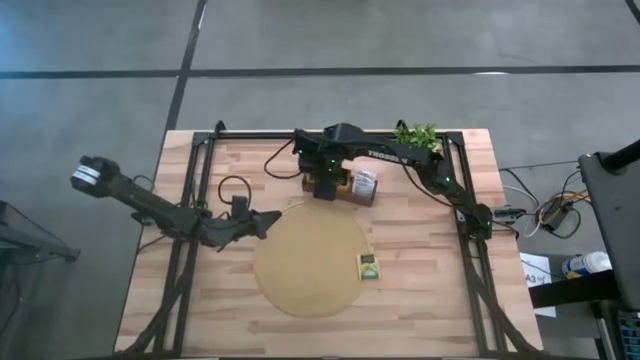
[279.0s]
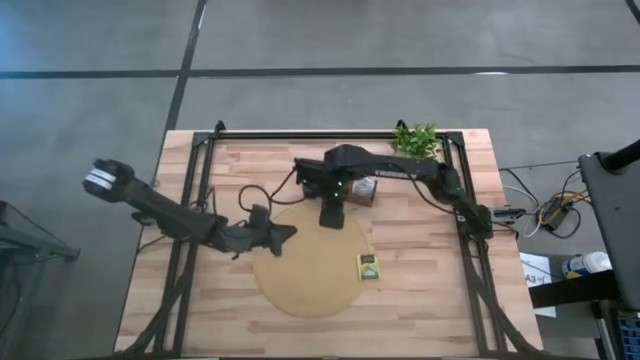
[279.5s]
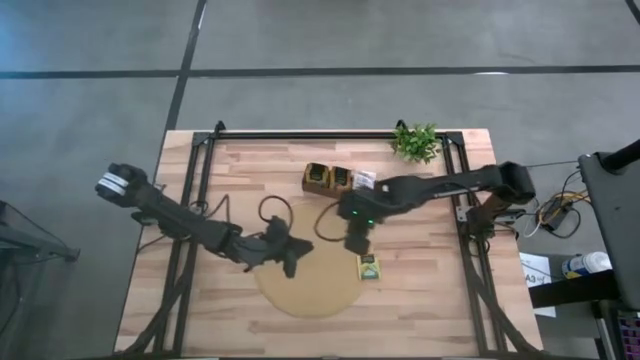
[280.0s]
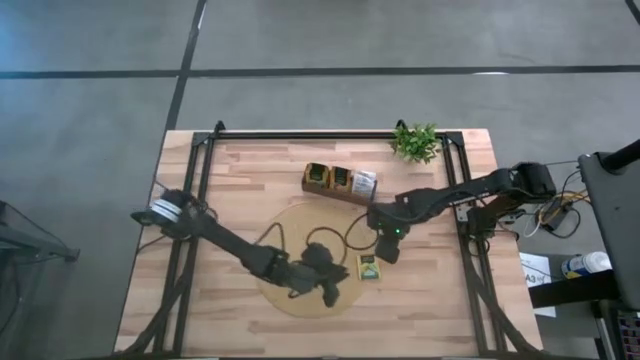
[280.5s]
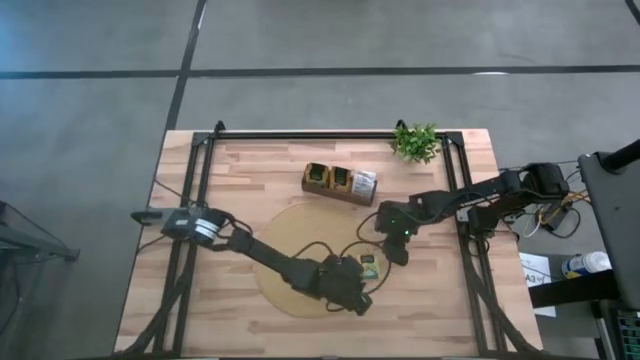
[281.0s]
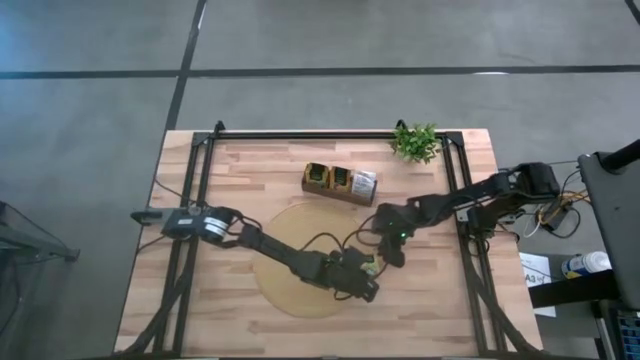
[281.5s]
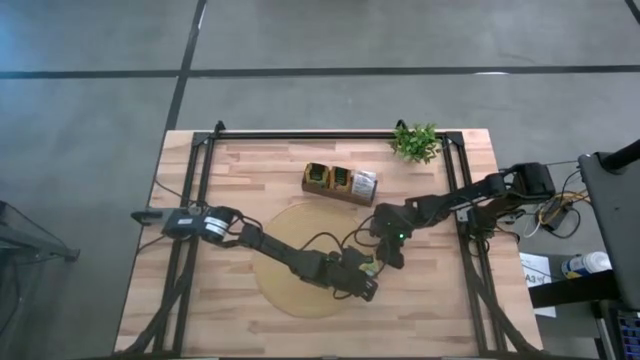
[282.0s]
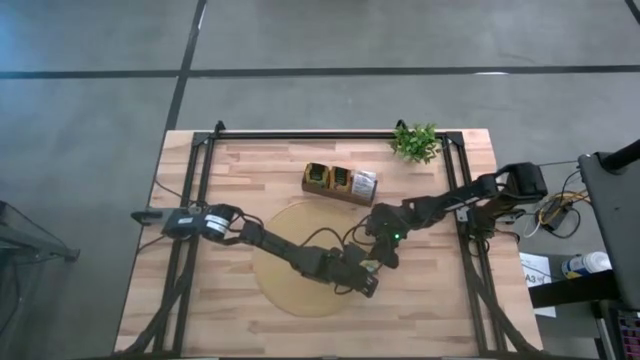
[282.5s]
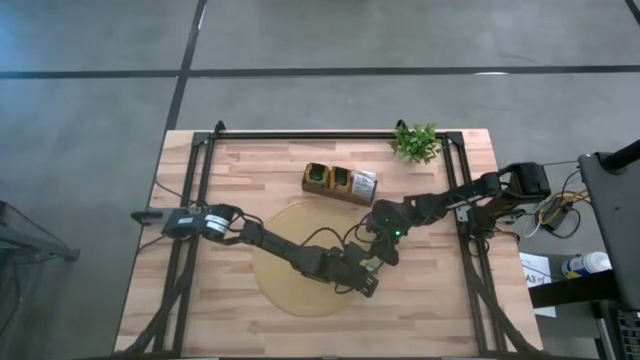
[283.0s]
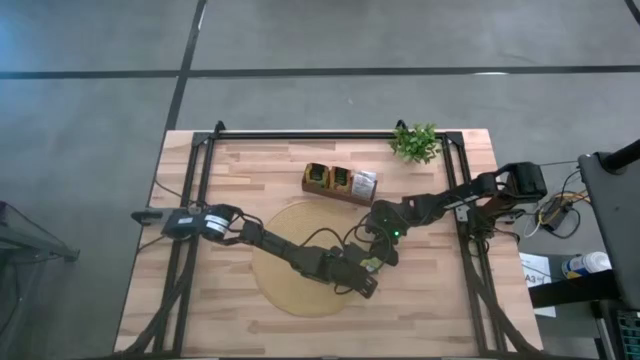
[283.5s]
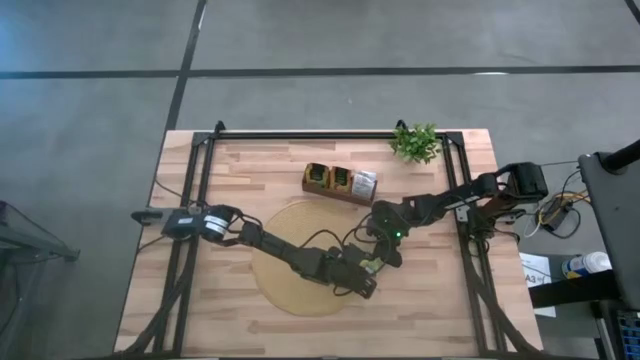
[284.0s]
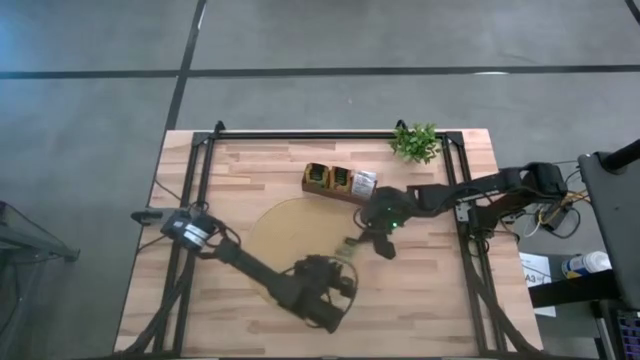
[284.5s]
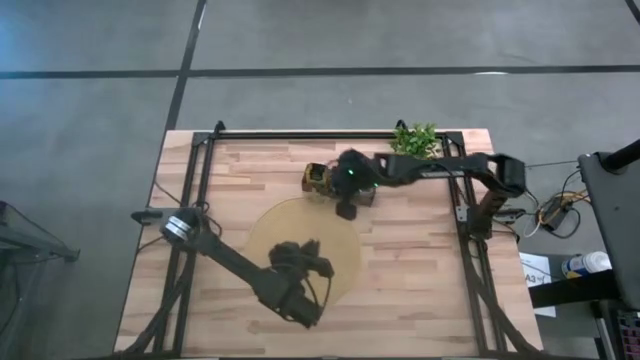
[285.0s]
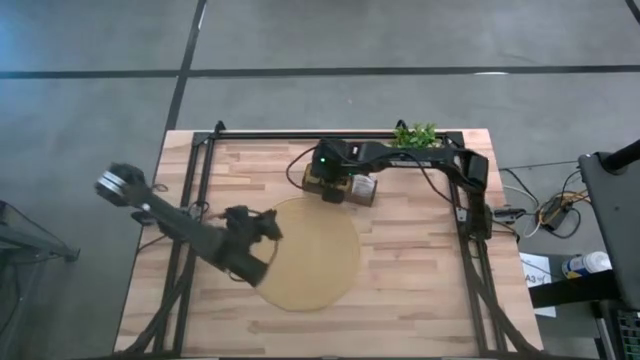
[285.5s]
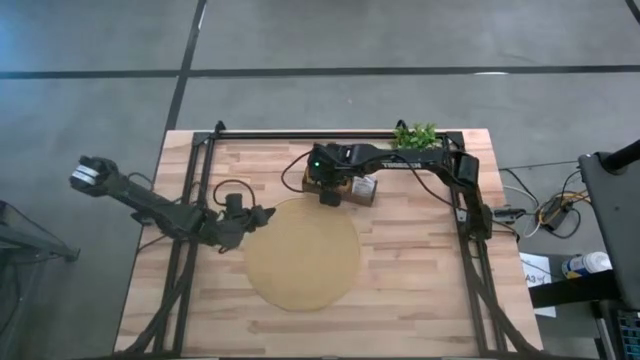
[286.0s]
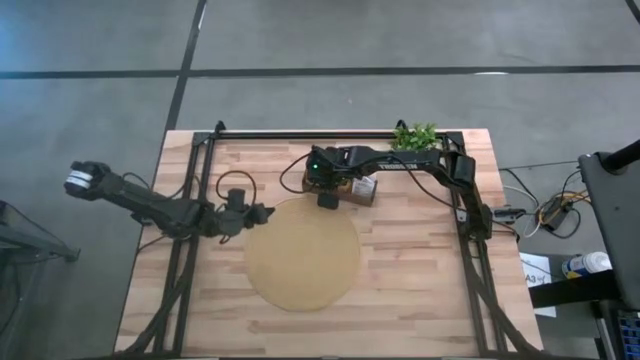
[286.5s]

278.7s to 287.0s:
Task: Pick & Place Tea
Put the green tea bag into the left section of the wooden organizer

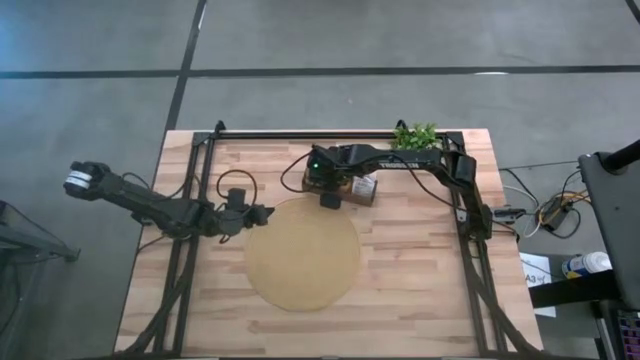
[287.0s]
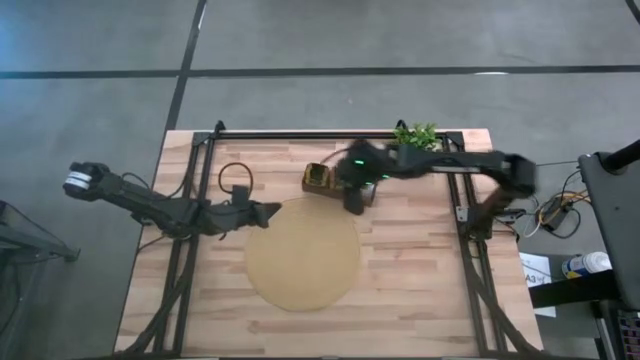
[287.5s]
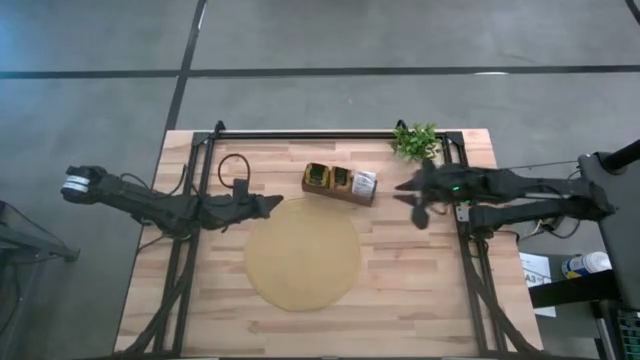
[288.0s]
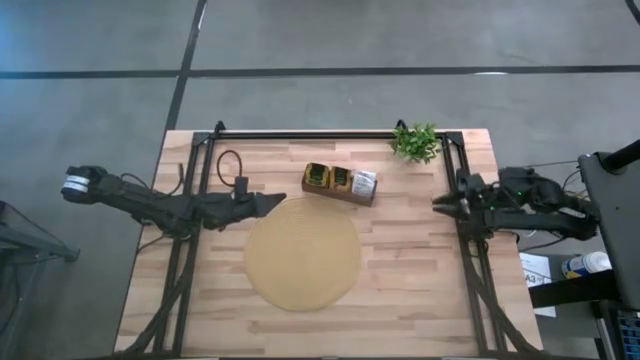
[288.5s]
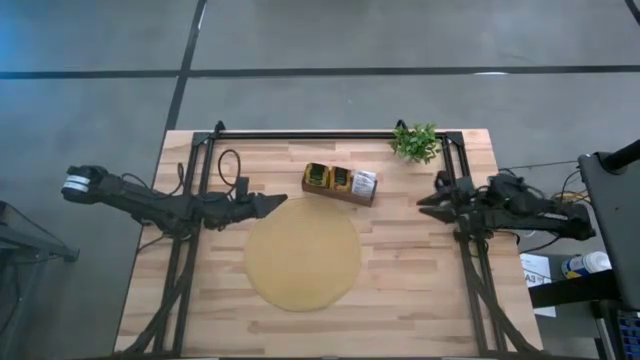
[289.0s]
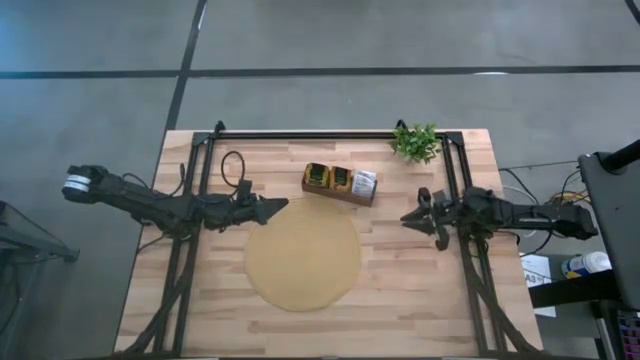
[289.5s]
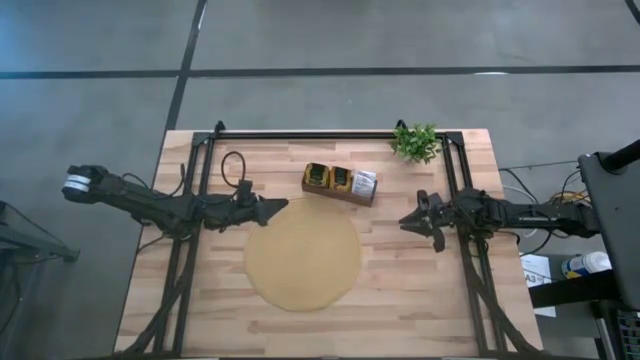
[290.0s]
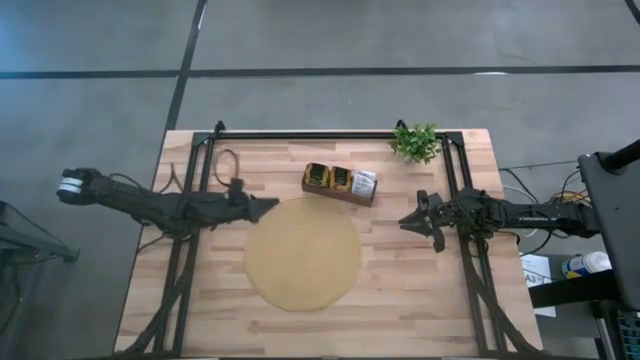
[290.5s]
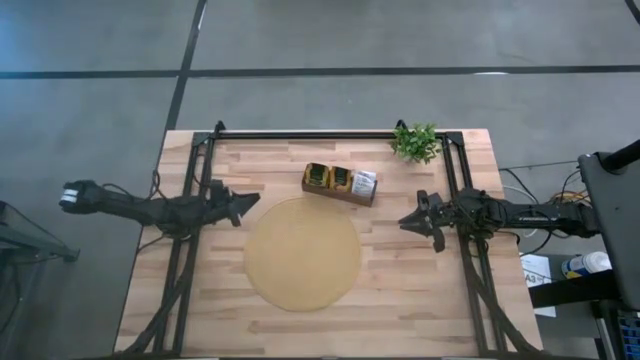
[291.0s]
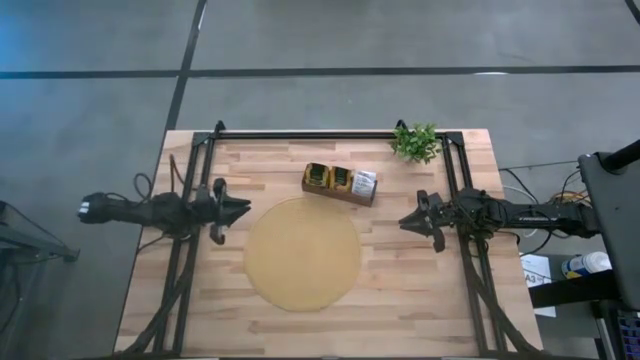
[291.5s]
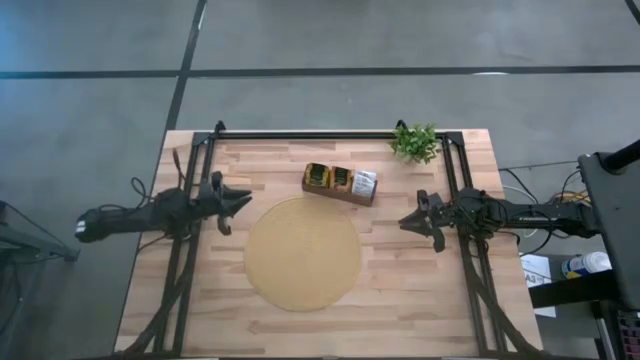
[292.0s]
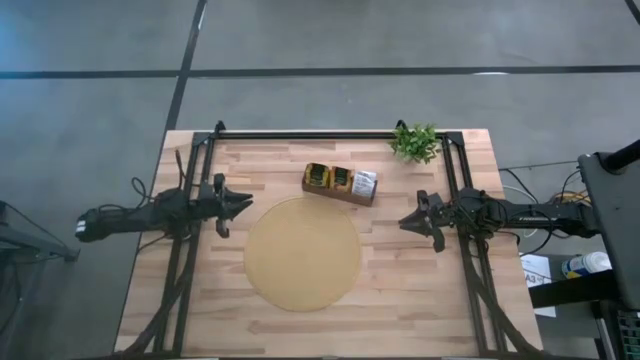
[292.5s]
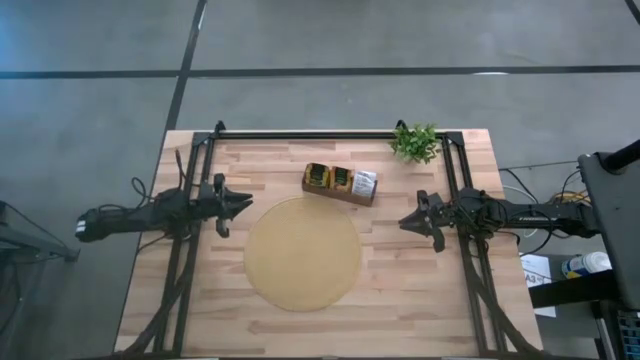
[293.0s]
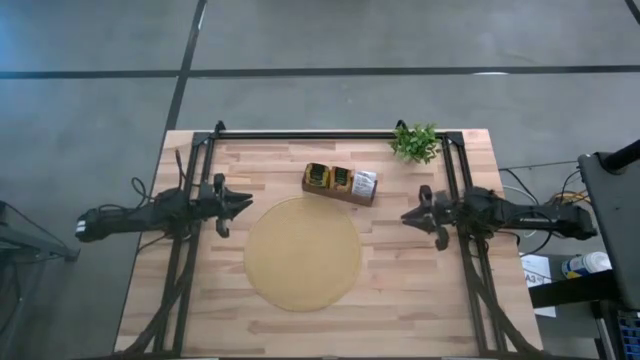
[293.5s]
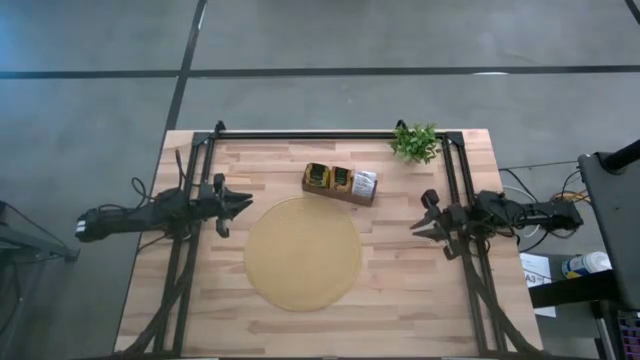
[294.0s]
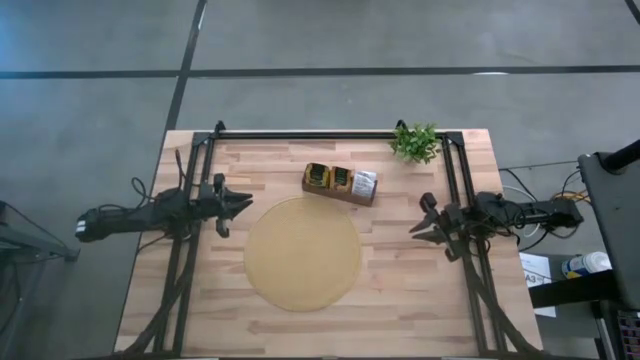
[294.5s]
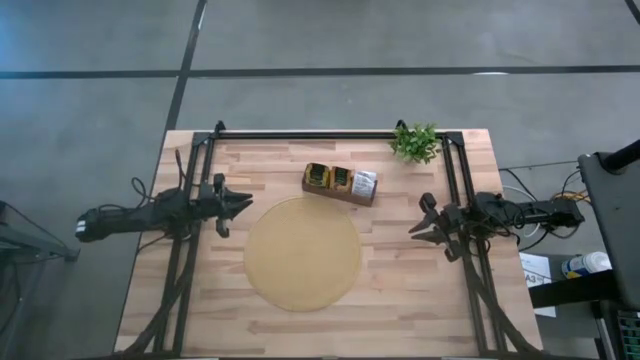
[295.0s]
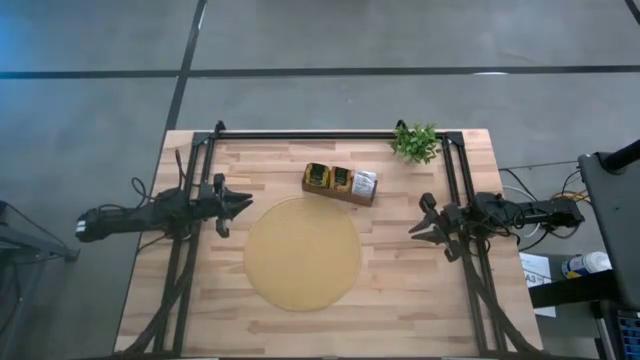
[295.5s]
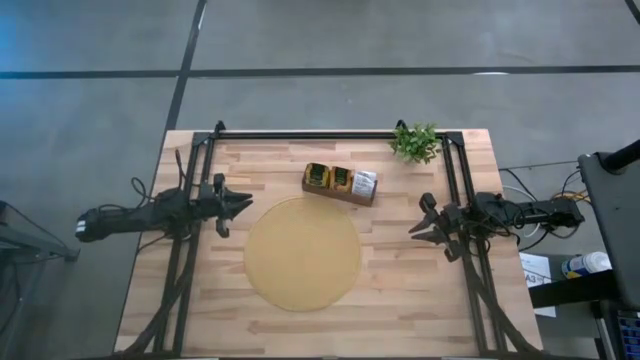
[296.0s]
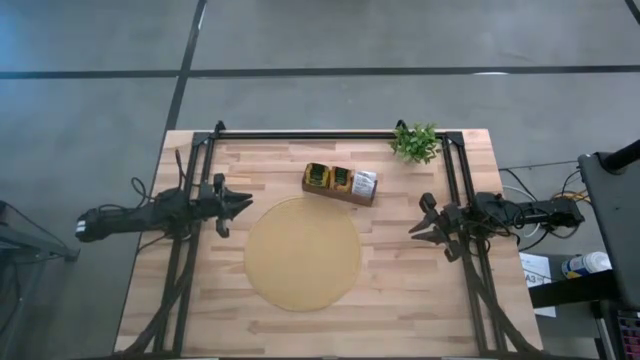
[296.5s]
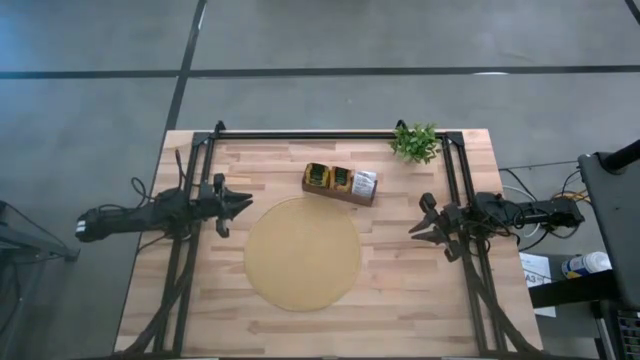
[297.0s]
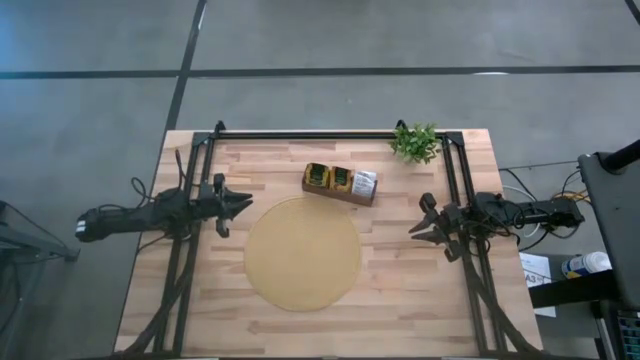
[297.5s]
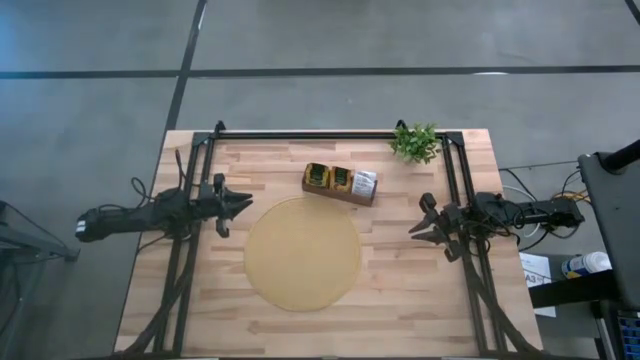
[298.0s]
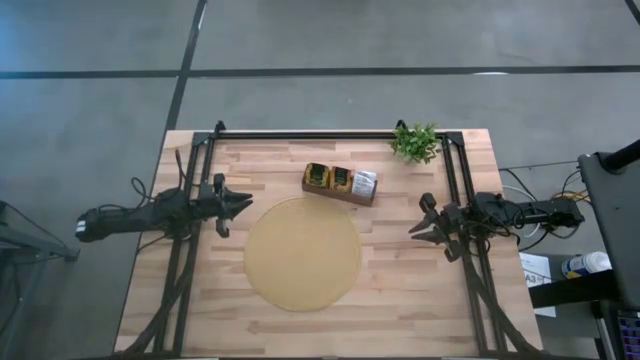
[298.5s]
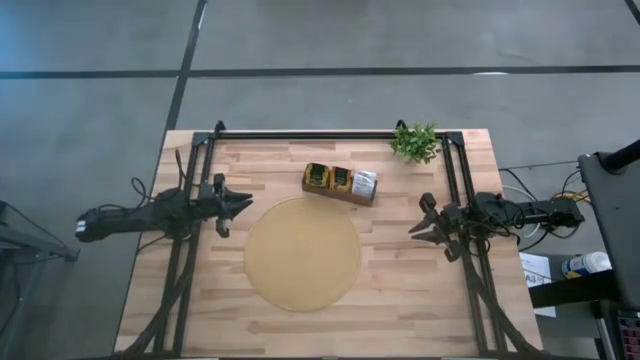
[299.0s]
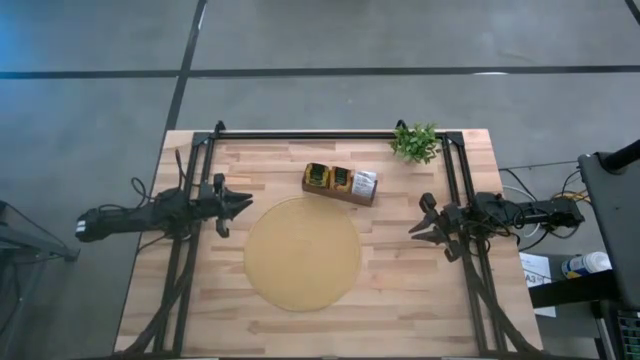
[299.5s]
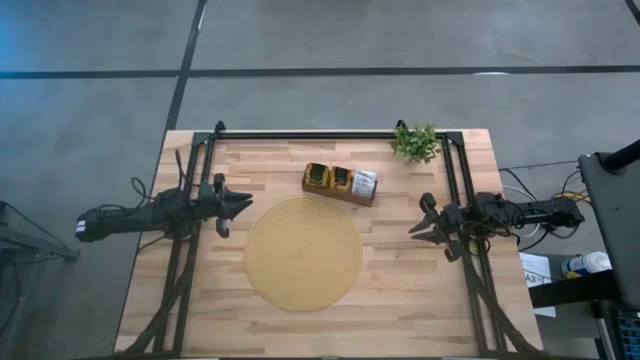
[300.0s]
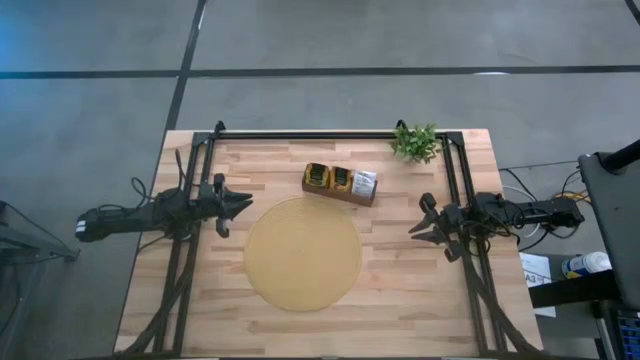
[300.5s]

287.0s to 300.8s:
Return to Home Position

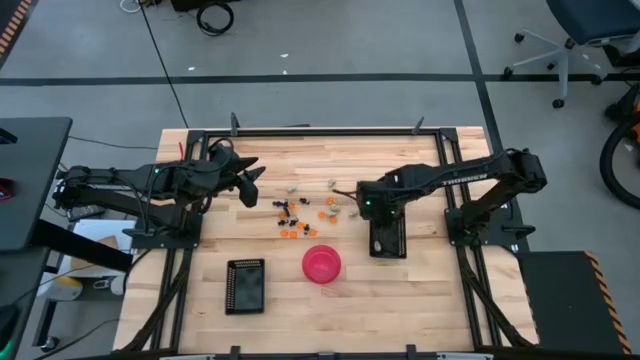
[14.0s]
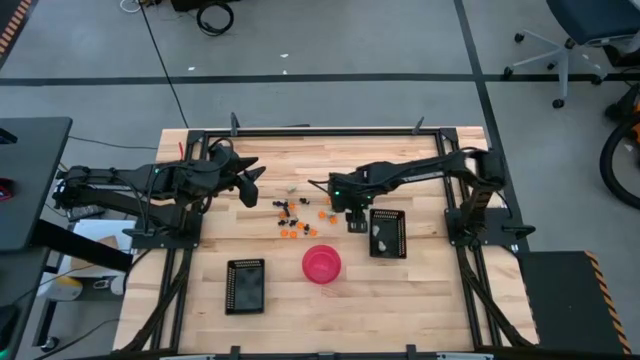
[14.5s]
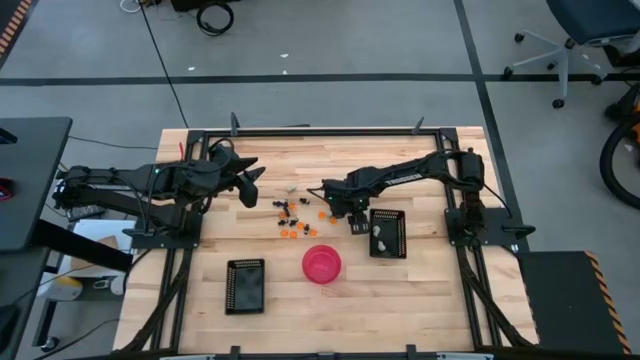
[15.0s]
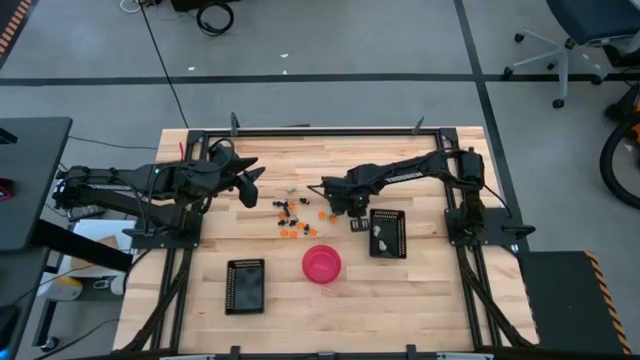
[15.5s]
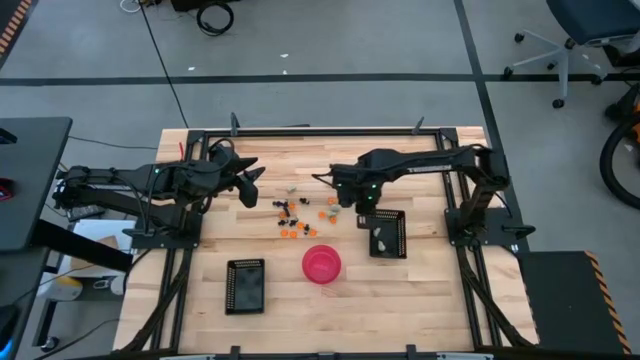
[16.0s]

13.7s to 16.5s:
Task: Sort Halloween decoration
Put the white skull toy into the top black bin
